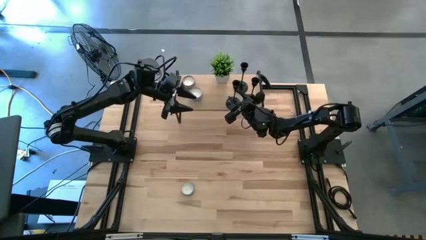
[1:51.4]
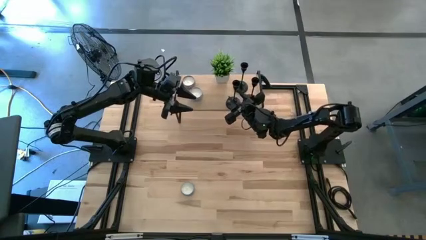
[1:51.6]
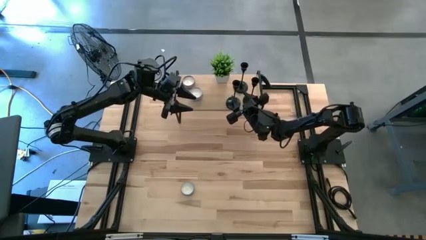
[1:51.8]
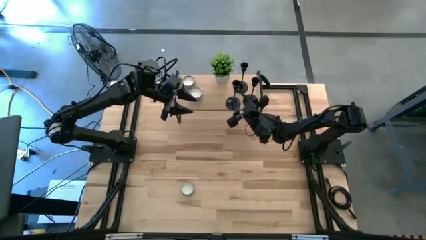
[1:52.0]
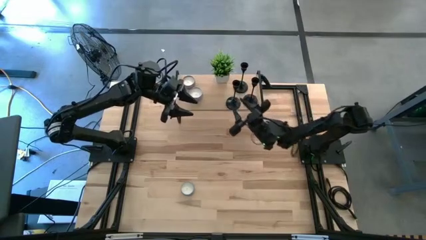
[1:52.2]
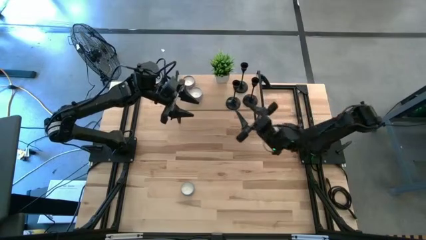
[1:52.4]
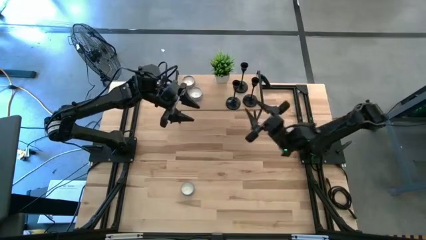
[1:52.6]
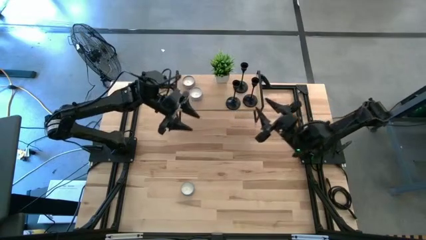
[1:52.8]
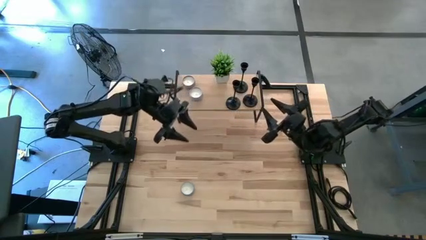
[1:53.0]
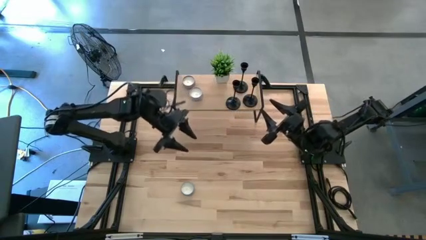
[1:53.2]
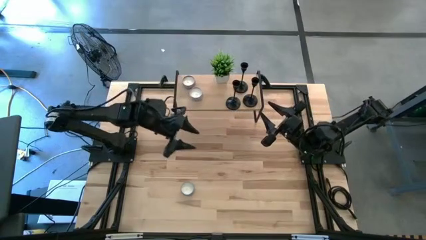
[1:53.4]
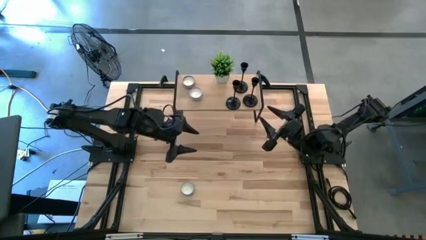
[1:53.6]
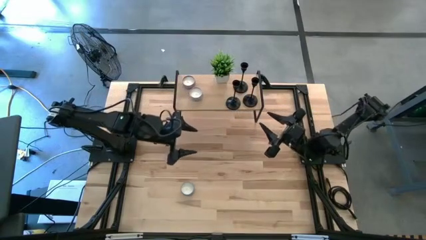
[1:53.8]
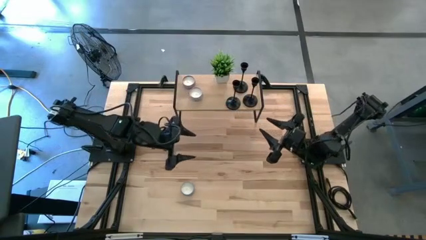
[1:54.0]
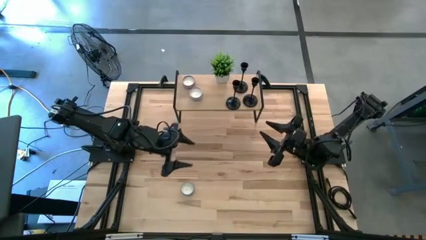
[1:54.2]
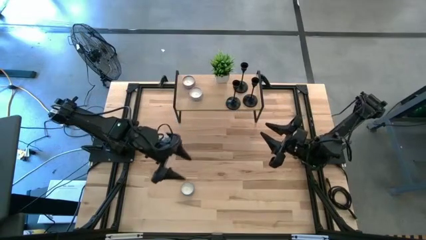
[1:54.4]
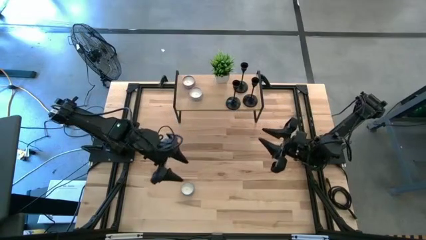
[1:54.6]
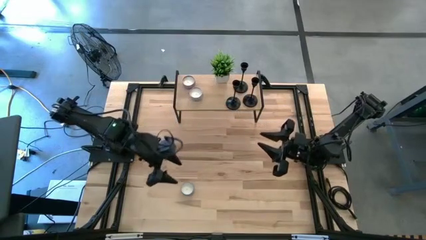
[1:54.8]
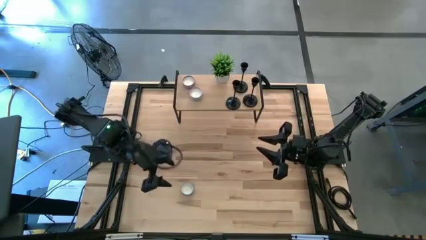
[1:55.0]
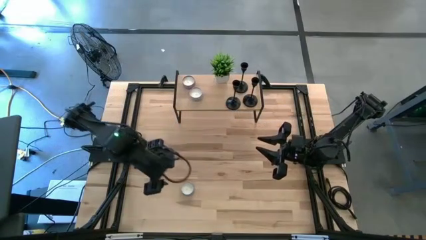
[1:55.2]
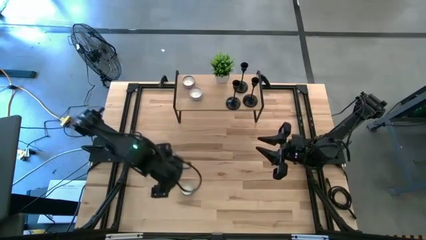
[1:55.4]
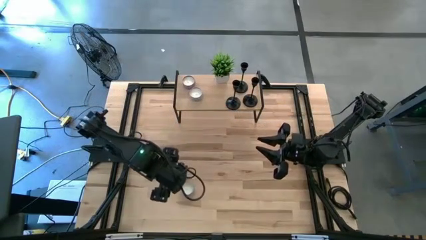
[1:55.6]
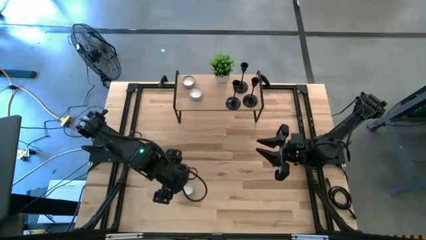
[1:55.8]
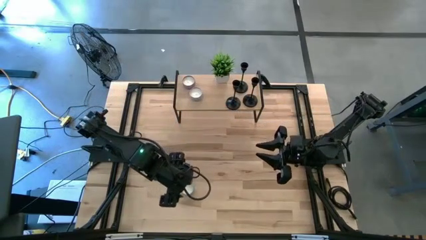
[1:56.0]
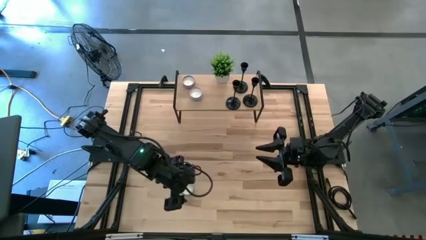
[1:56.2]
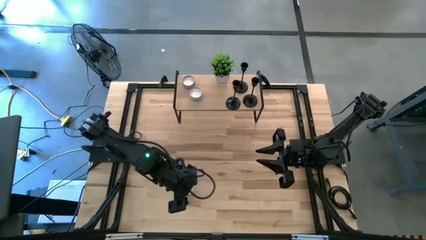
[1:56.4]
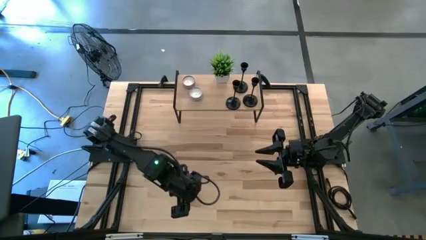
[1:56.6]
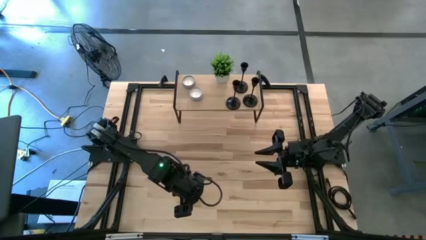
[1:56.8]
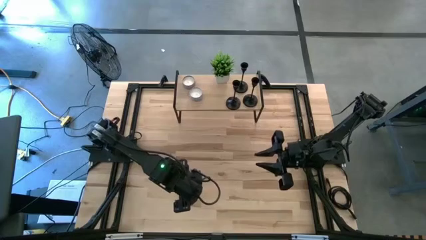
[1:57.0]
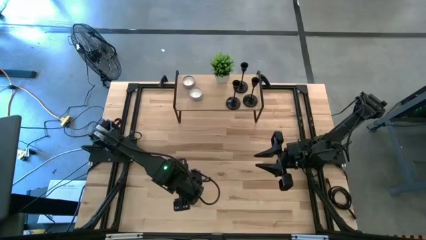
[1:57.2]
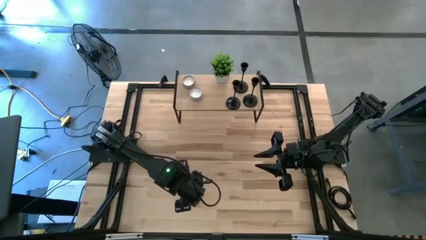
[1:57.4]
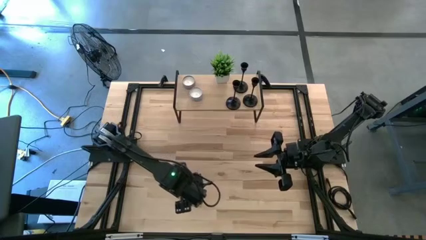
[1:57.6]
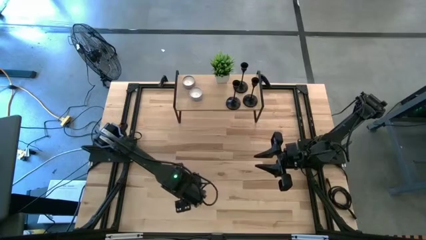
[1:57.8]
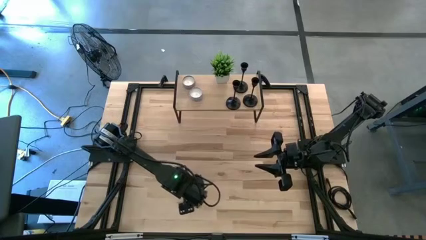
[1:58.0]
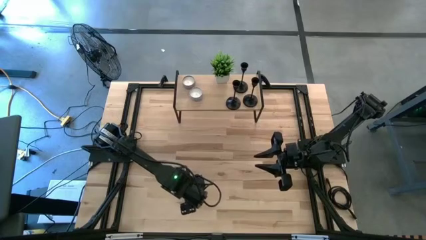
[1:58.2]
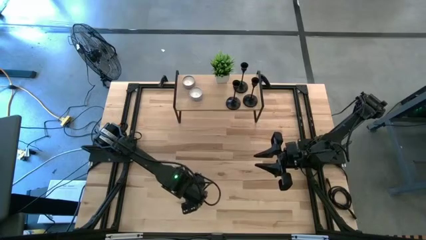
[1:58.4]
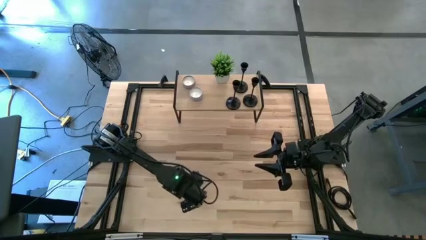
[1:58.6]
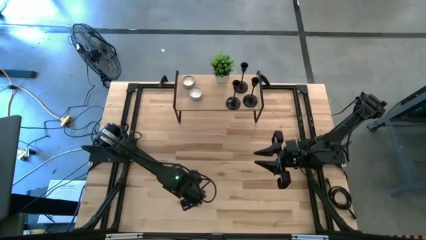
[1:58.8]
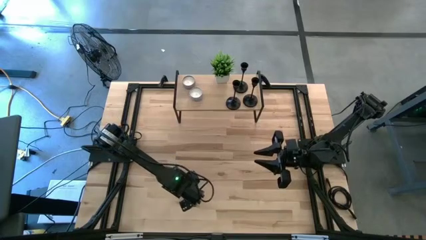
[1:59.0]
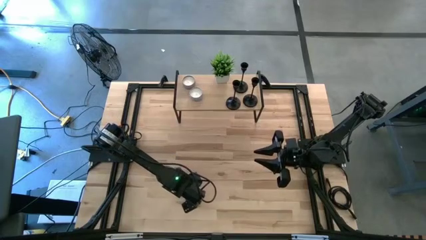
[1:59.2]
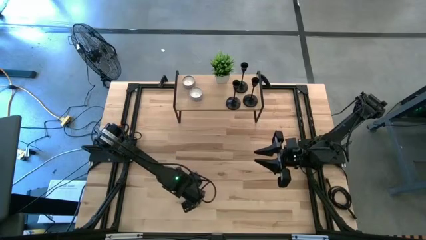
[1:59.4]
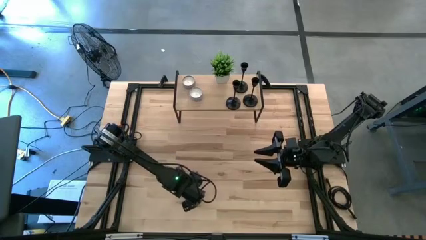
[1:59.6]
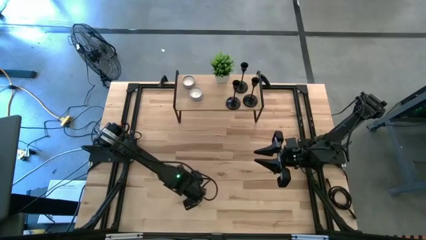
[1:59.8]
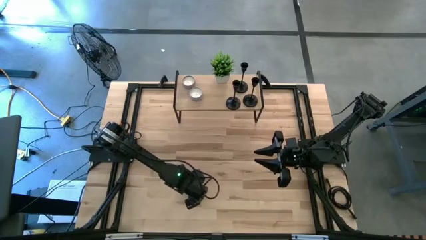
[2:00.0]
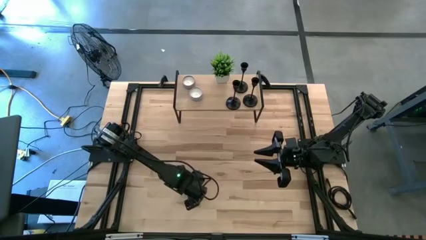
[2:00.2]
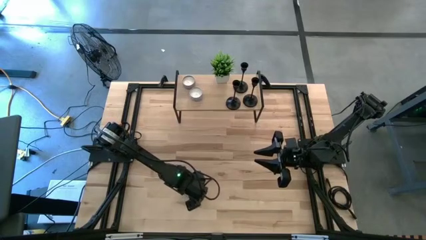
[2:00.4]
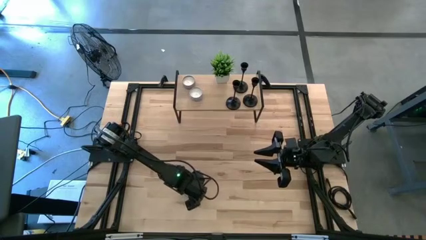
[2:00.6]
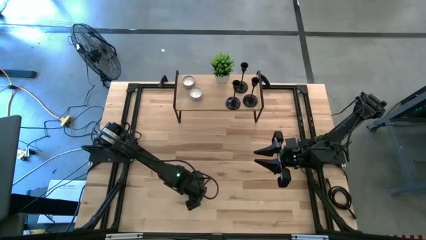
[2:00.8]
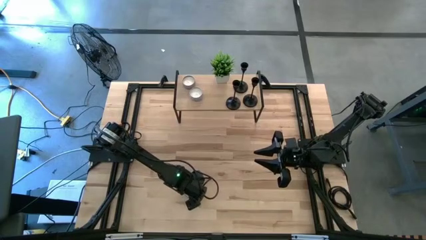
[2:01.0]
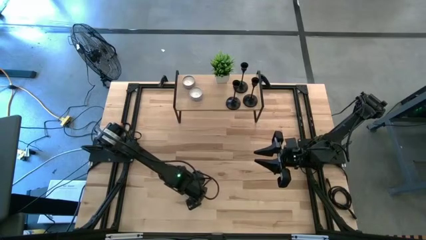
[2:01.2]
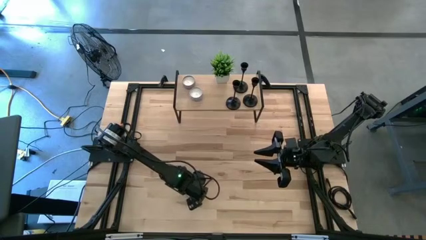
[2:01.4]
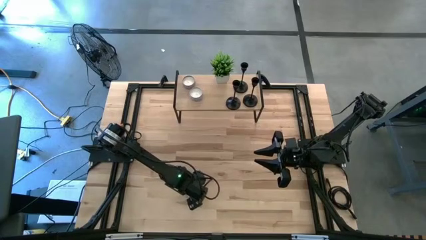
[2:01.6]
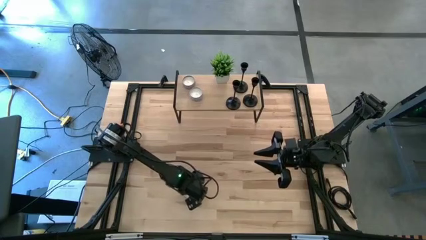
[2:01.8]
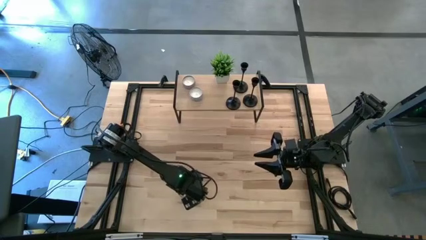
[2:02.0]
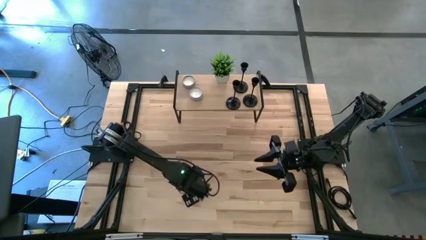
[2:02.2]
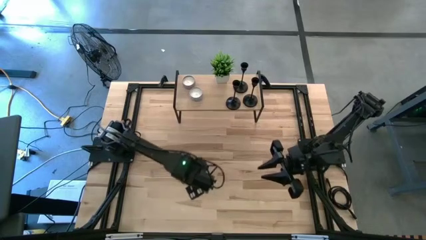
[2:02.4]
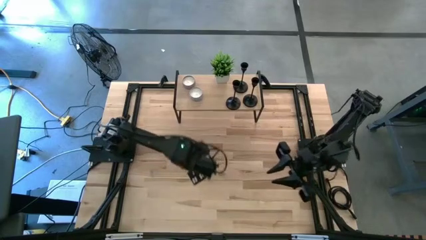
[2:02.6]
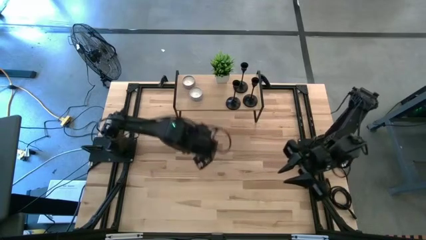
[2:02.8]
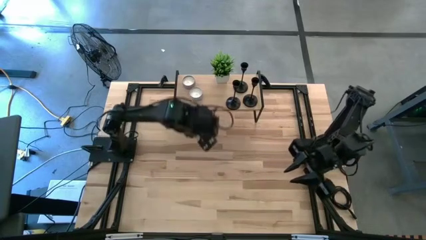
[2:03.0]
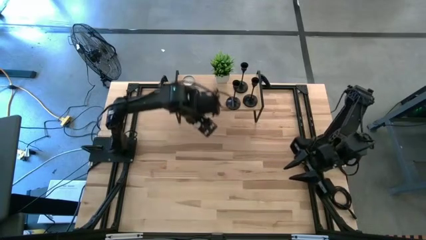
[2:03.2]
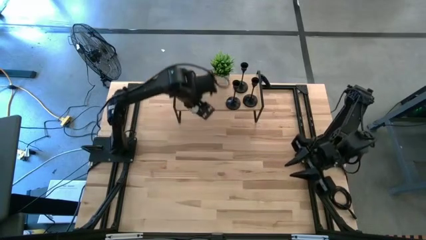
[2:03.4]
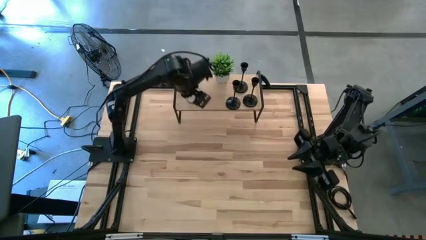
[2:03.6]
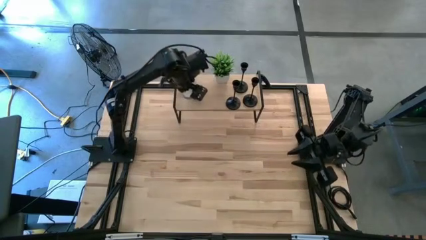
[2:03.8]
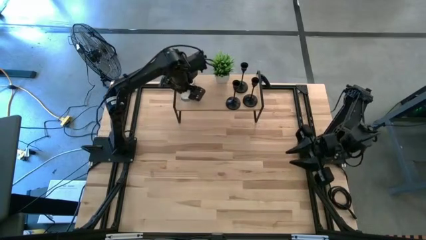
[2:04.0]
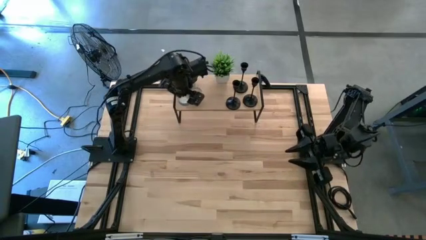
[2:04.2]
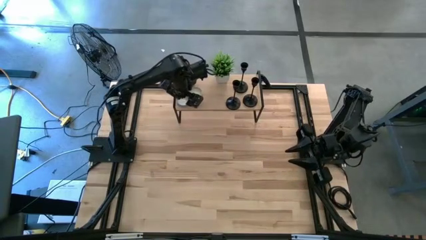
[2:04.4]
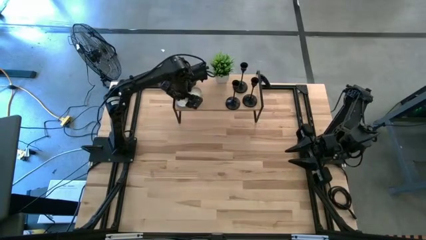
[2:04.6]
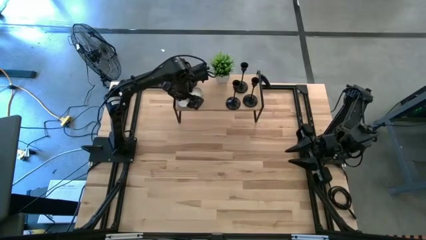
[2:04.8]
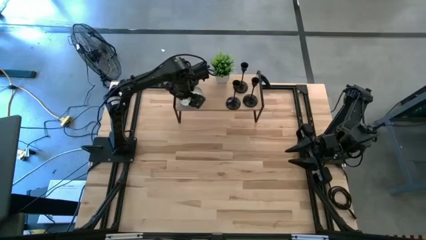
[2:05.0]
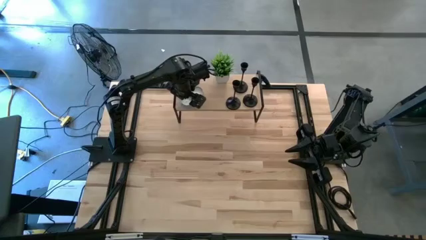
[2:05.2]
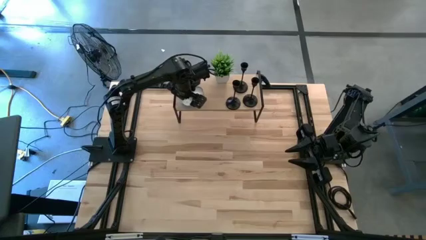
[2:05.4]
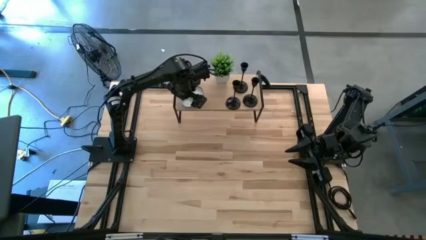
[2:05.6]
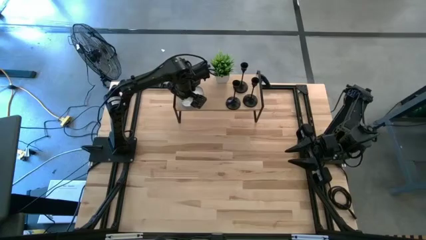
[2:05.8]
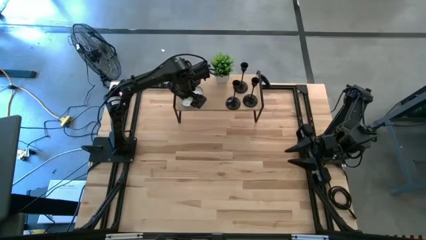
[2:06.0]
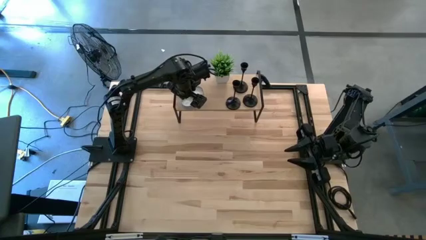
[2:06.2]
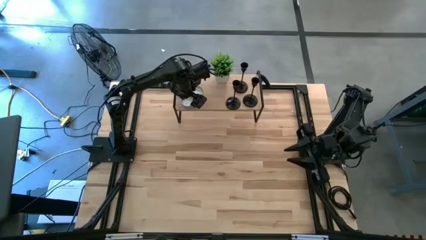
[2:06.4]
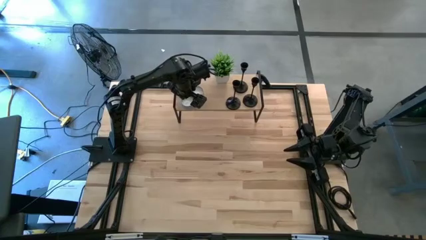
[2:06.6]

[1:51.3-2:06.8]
Task: Pick & Place candle stick holders
Put the blue candle on the shelf
